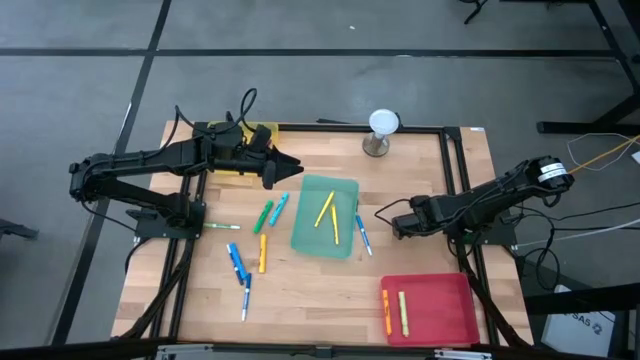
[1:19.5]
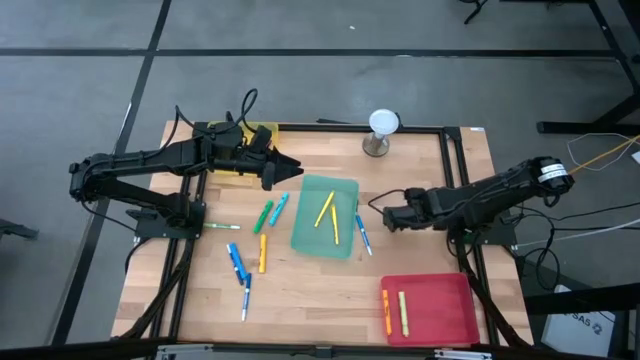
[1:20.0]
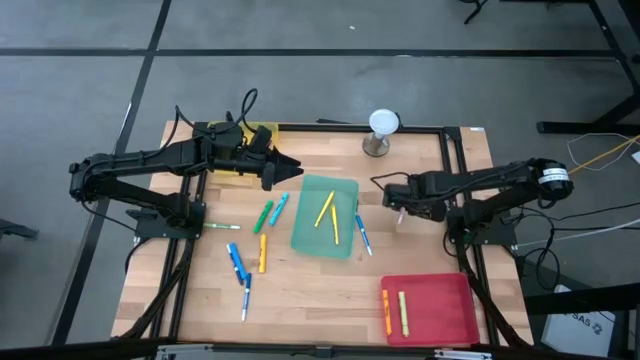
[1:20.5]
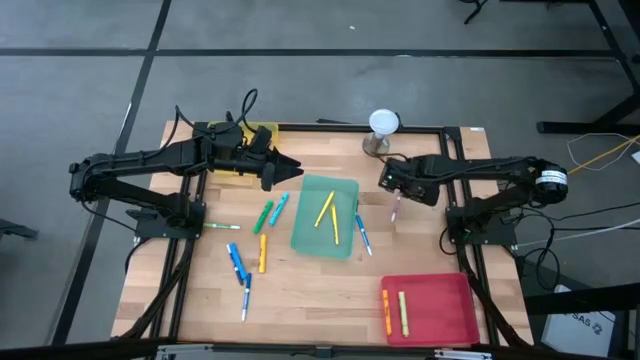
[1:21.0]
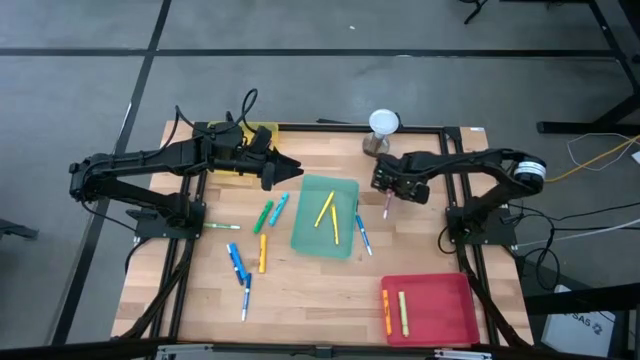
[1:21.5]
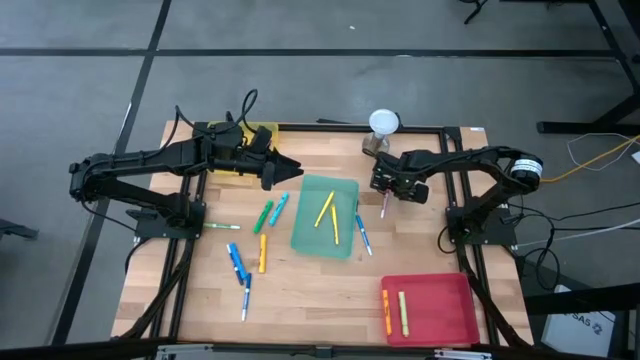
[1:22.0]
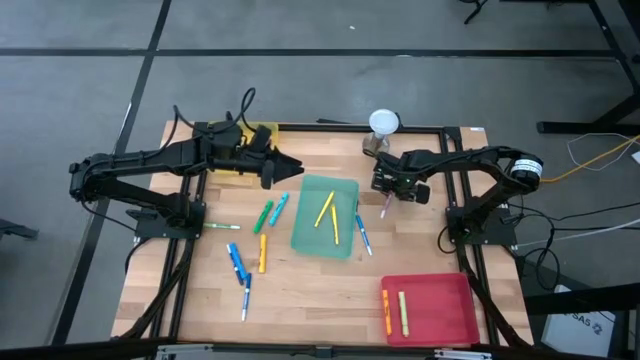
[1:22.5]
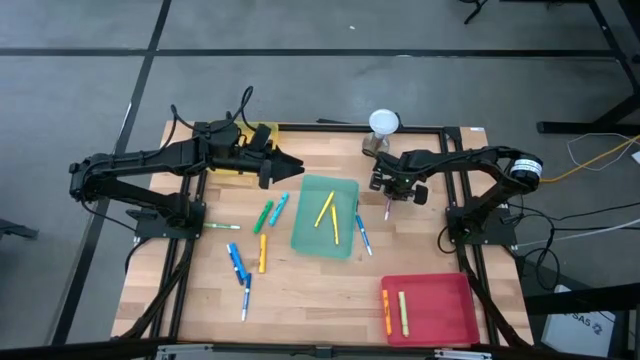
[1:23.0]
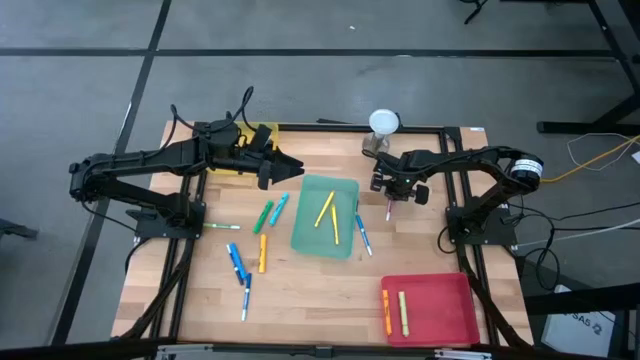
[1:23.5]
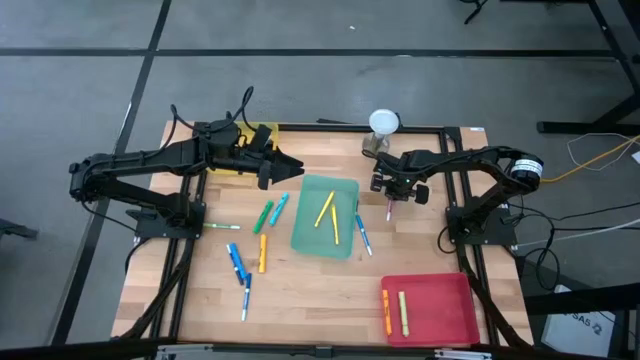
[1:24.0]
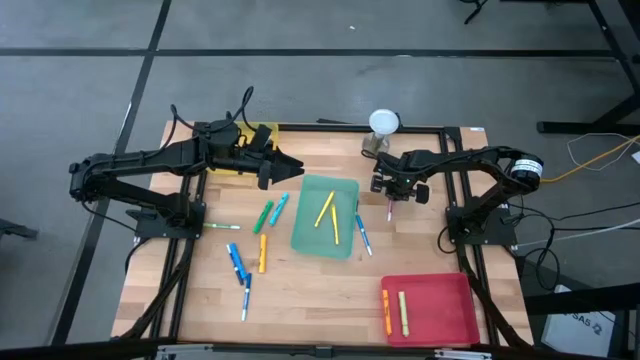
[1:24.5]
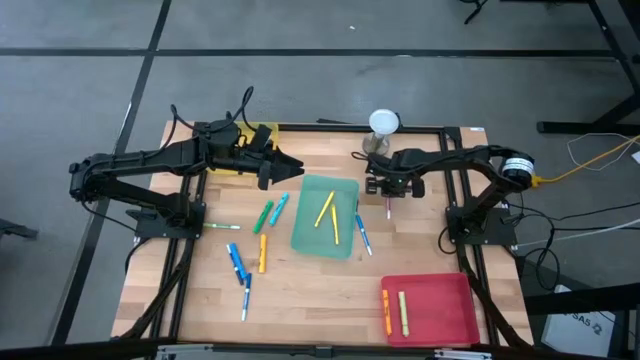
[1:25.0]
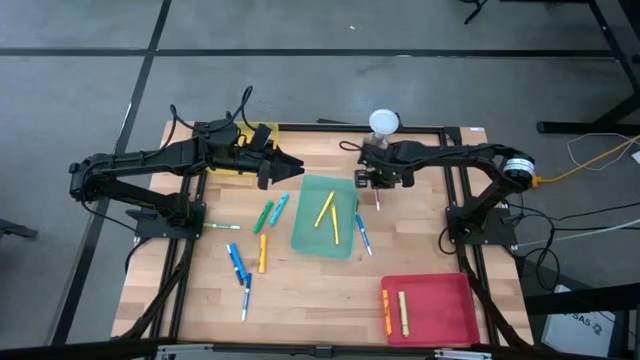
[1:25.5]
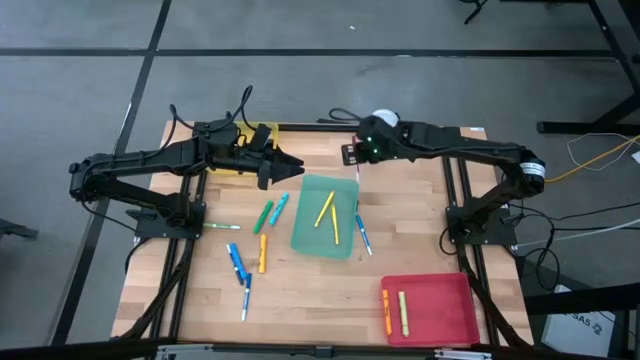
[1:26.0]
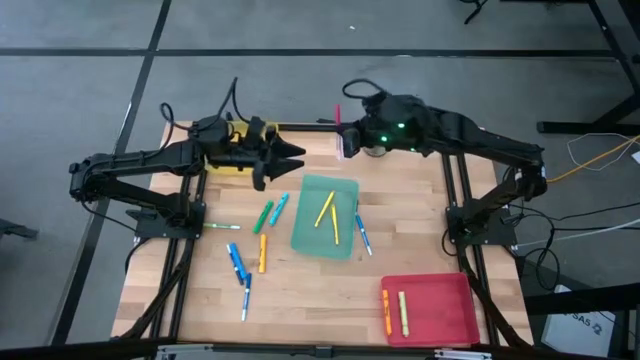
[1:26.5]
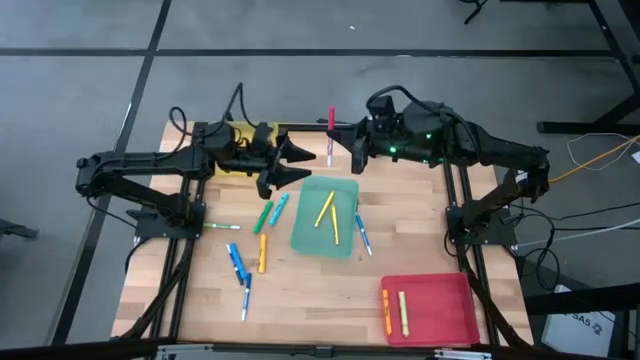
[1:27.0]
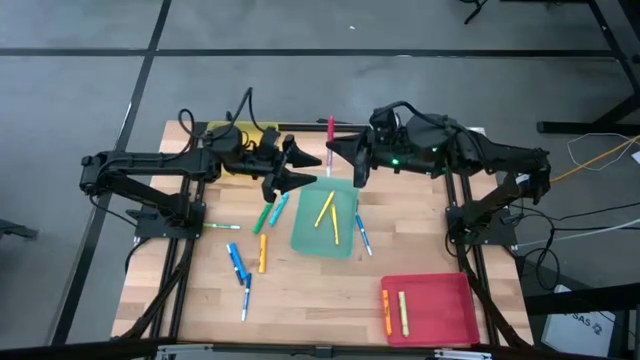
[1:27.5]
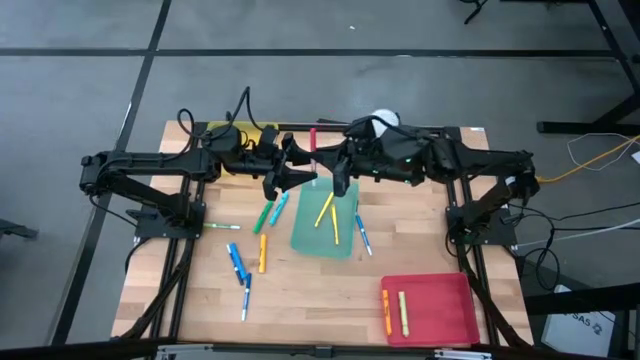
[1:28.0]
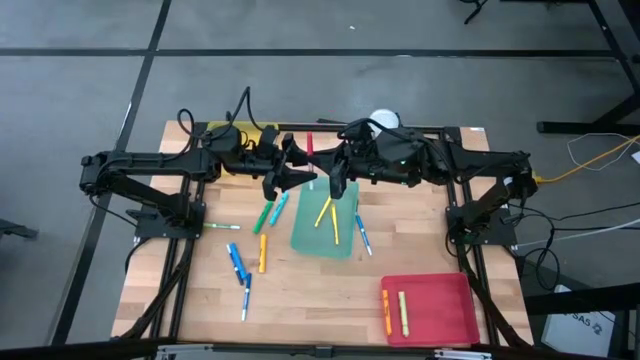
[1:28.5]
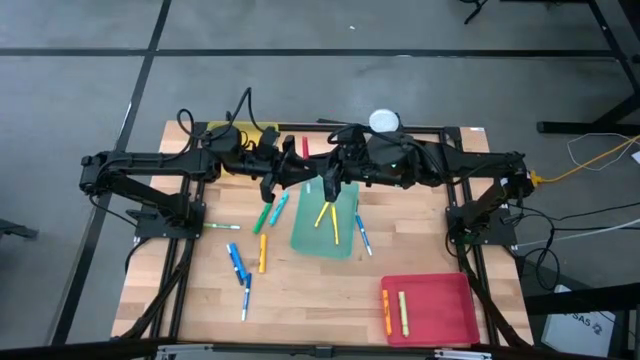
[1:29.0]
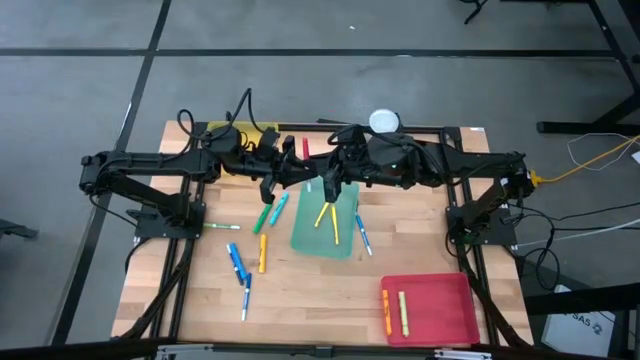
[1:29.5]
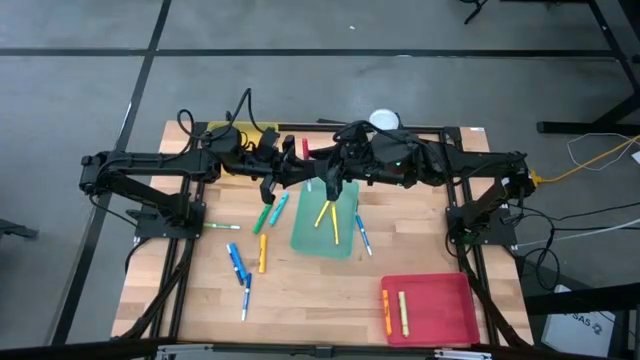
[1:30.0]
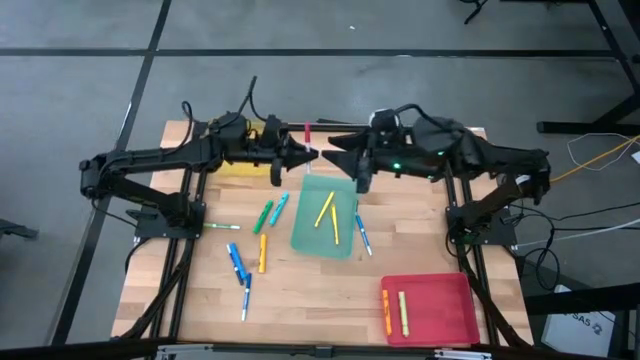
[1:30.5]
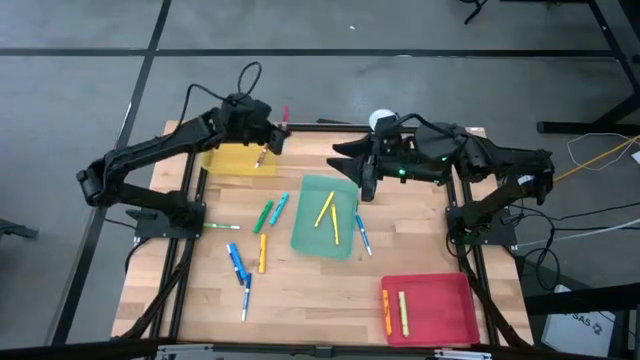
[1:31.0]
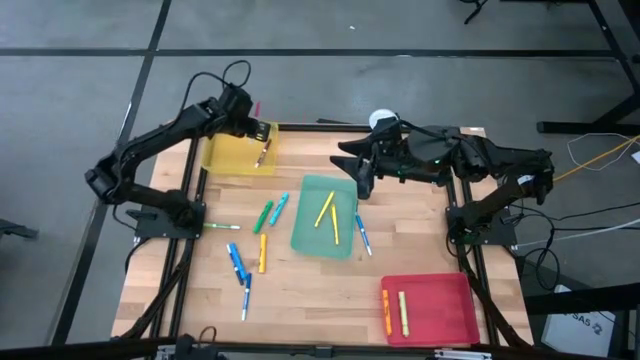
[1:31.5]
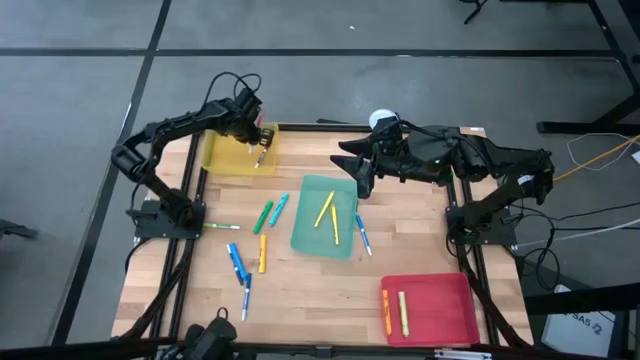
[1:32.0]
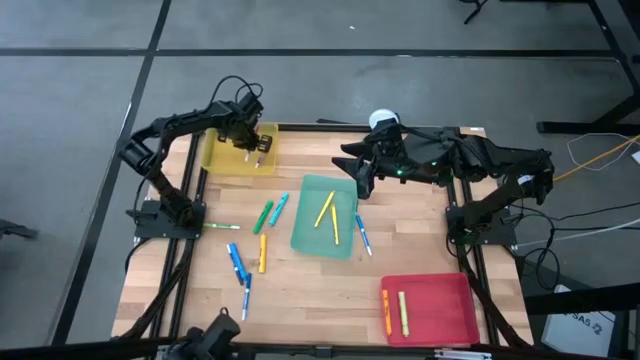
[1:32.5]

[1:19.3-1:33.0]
Task: Pick & Place Markers
Put the pink marker pen into the yellow bin

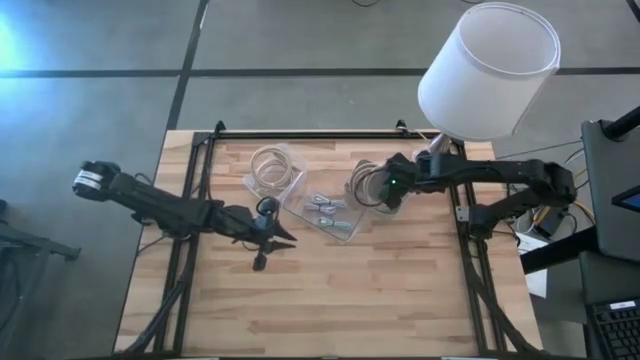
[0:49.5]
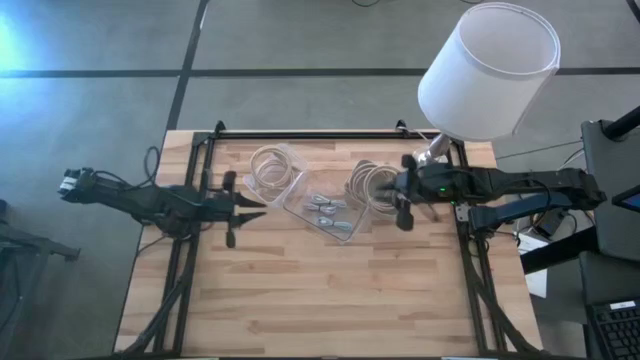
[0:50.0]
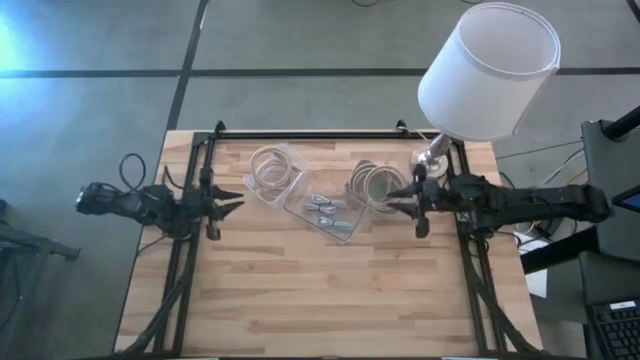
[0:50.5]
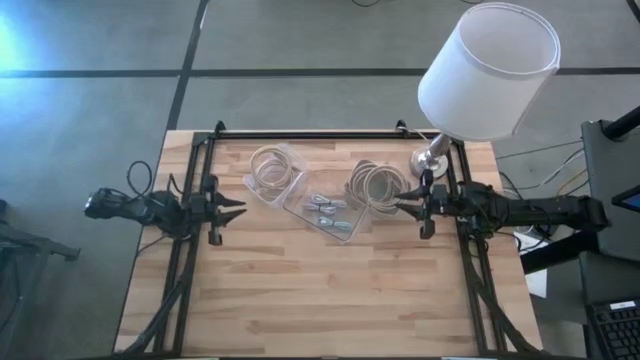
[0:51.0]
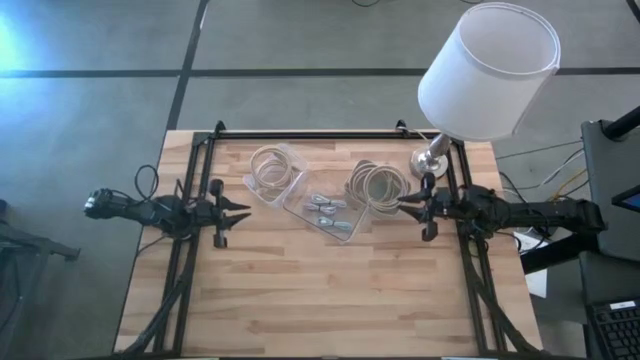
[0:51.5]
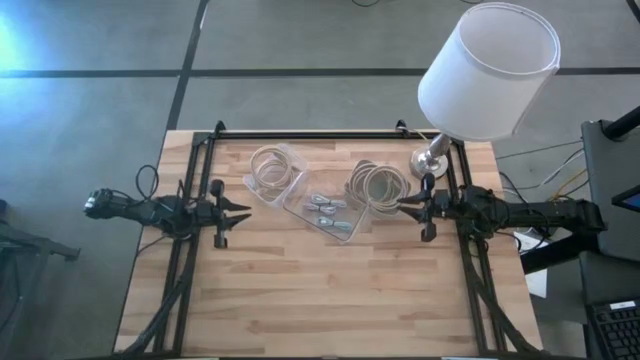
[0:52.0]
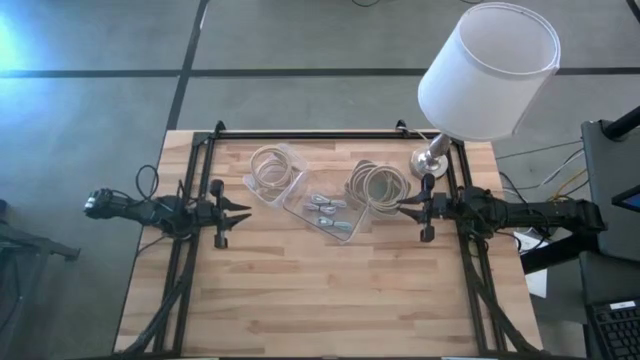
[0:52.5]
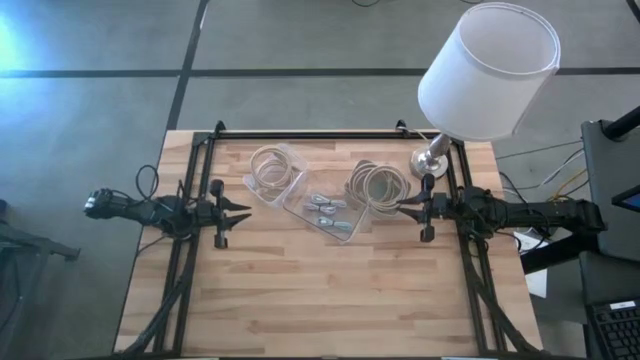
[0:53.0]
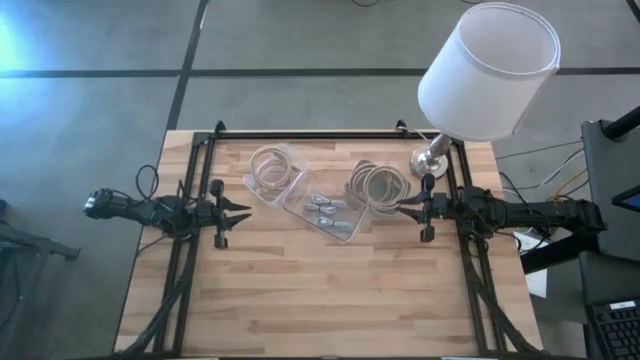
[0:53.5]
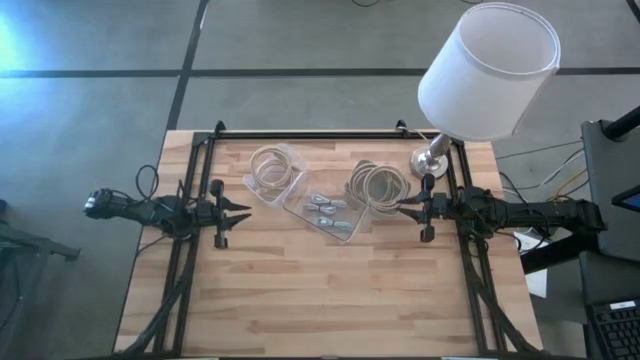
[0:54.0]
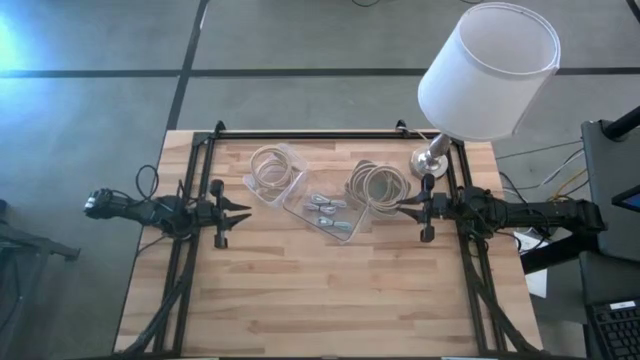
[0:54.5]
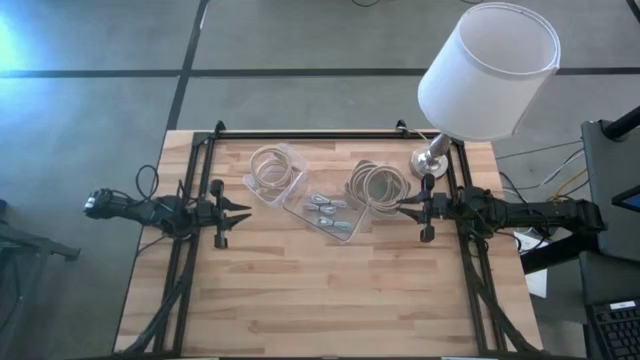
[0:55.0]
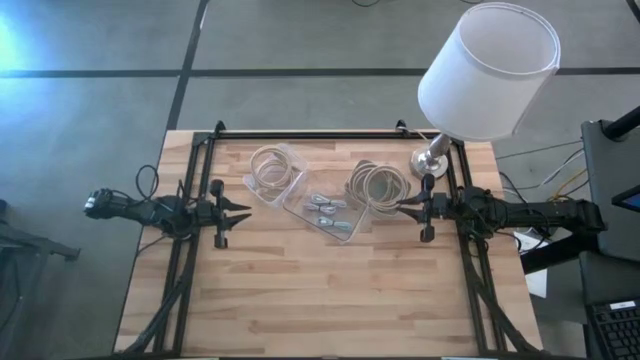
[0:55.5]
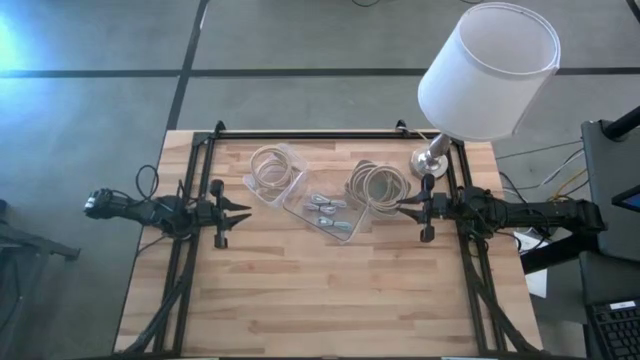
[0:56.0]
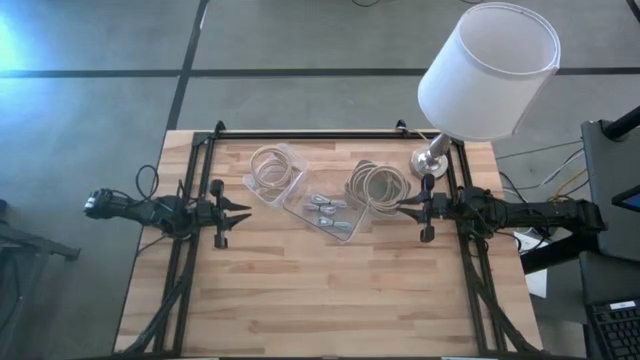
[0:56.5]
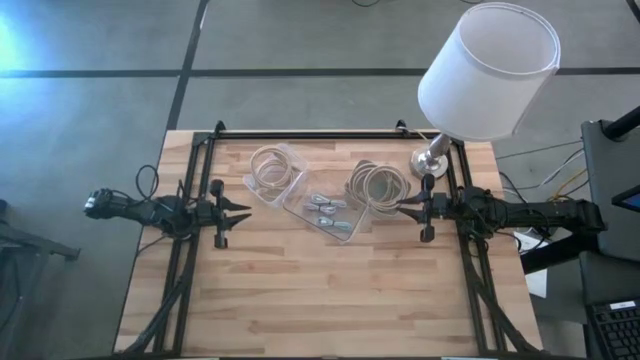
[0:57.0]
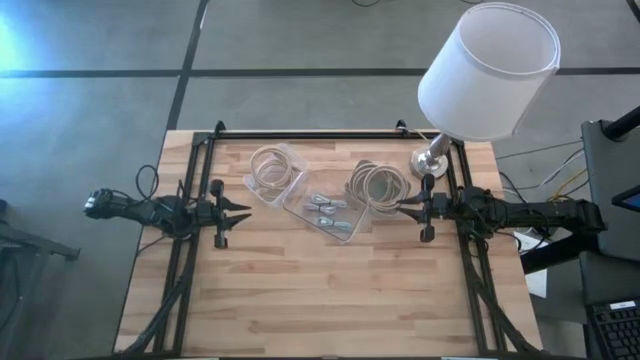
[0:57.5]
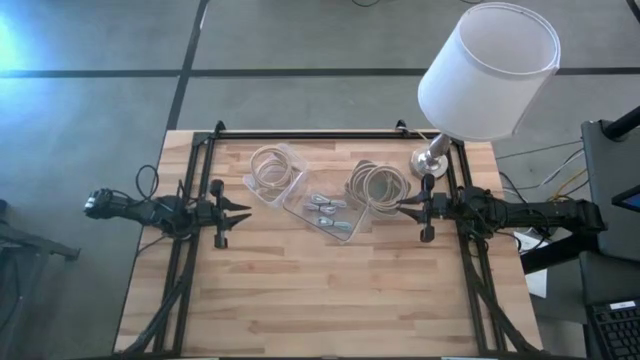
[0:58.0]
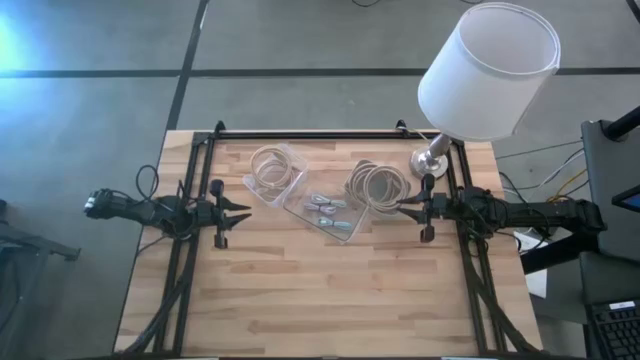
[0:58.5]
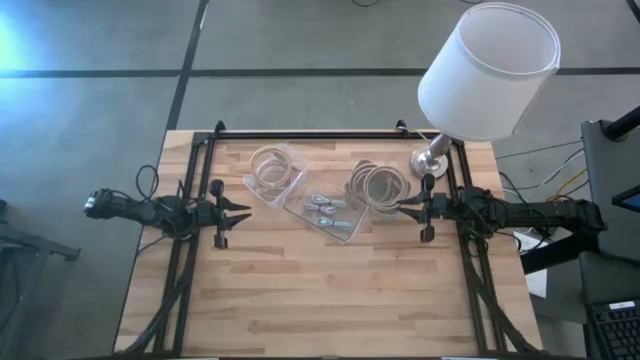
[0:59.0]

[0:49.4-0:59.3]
Task: Pick & Place USB Port
Return to Home Position
